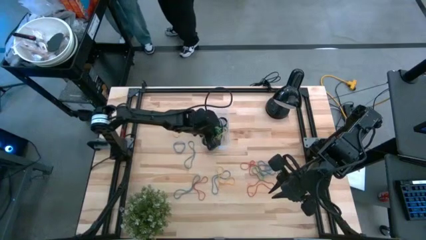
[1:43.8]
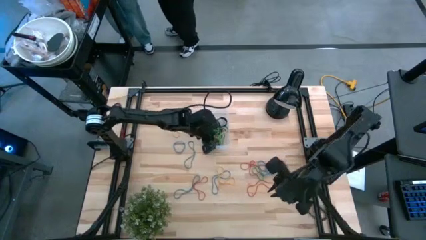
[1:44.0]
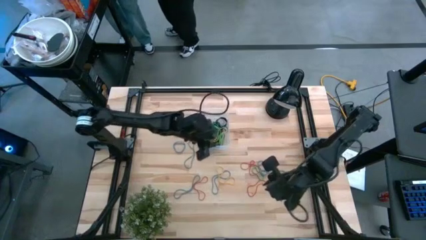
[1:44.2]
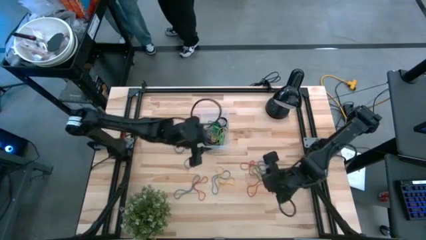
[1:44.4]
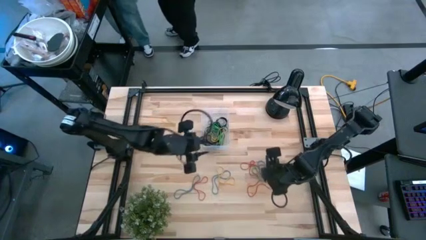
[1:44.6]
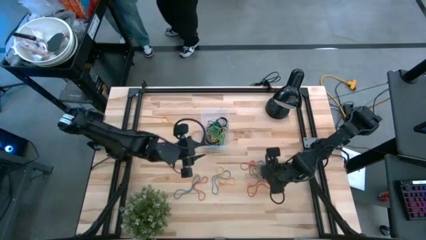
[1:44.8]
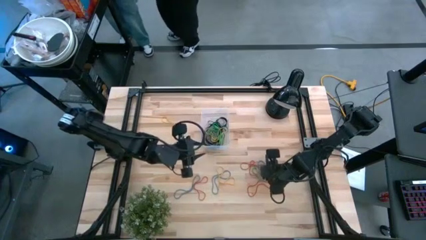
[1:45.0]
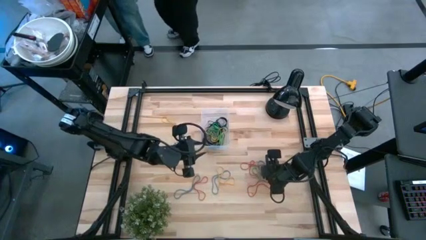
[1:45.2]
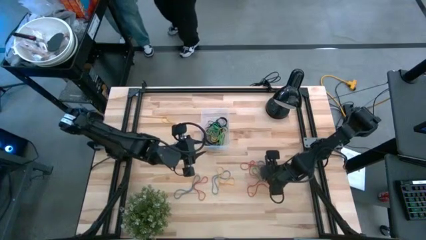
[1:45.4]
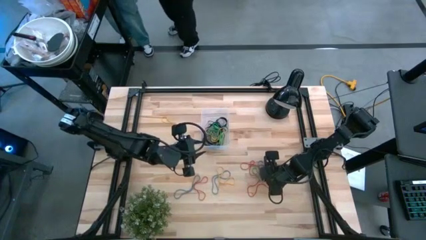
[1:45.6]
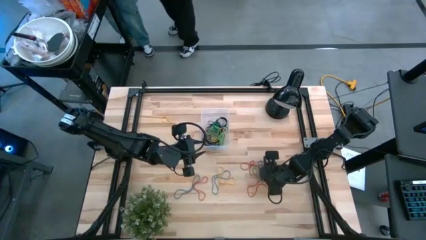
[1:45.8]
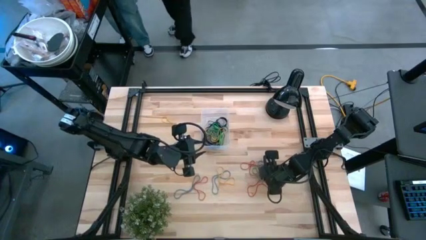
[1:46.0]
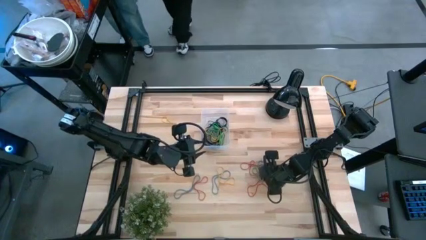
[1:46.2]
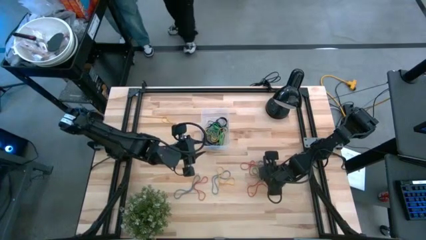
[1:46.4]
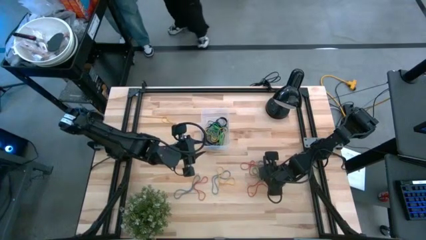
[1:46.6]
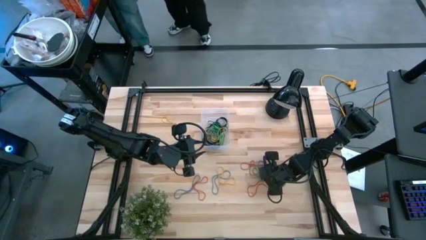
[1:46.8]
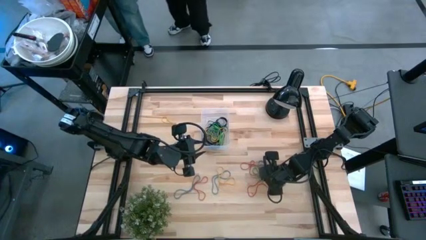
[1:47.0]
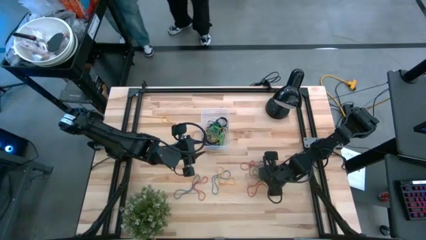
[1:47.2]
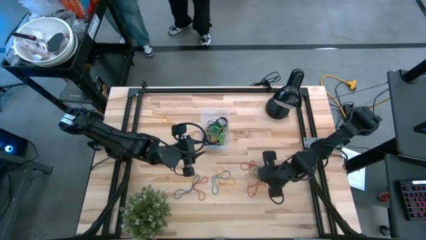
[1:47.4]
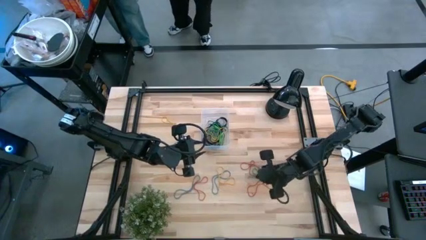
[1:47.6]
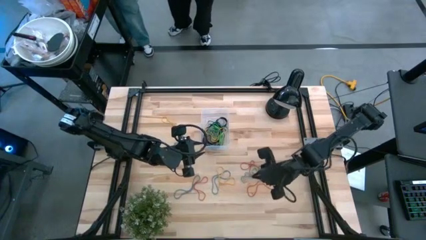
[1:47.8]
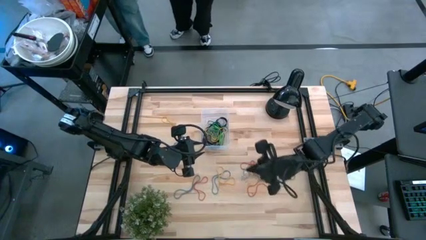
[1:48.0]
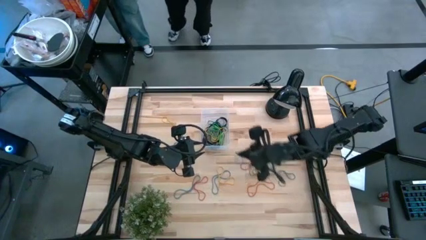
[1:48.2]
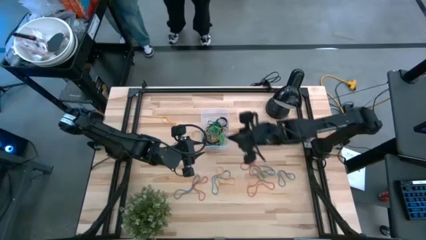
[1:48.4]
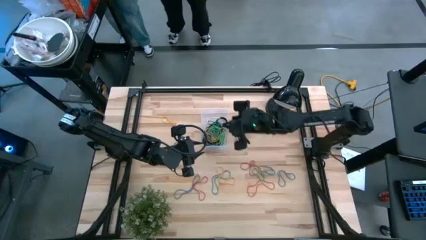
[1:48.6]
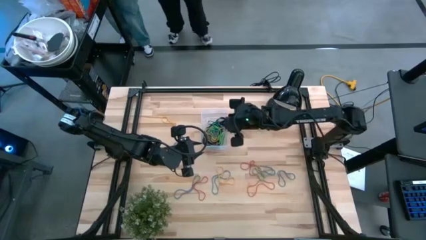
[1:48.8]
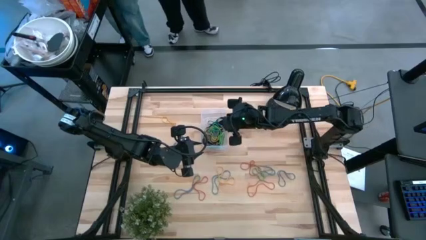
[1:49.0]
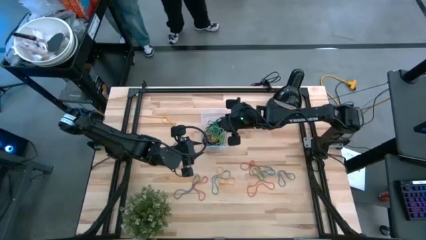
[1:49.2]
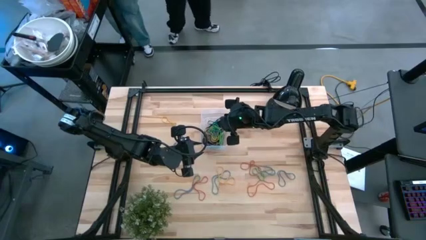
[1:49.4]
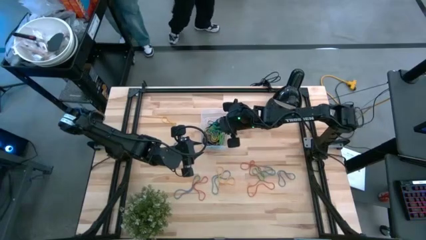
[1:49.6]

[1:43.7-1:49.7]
Task: Pick and place rubber bands into bin
Put the blue rubber band into the transparent bin

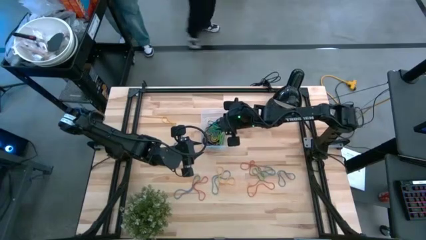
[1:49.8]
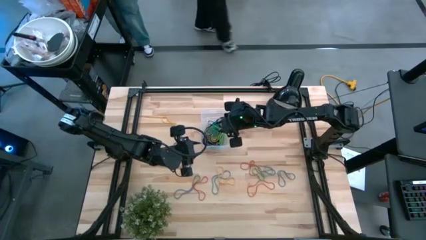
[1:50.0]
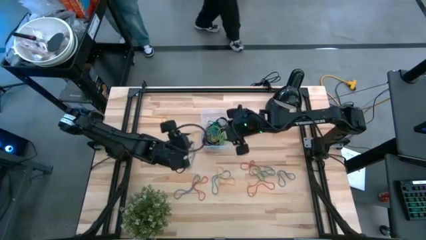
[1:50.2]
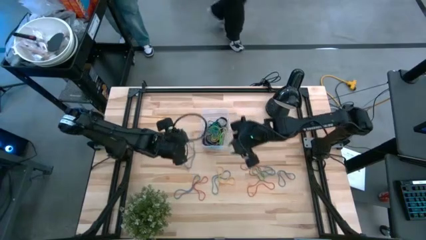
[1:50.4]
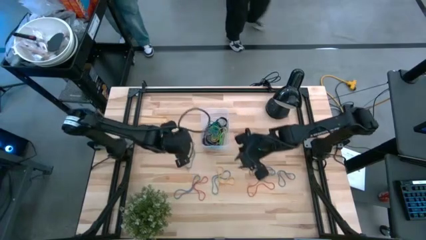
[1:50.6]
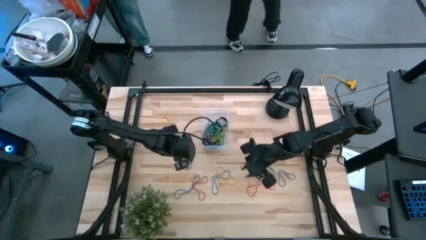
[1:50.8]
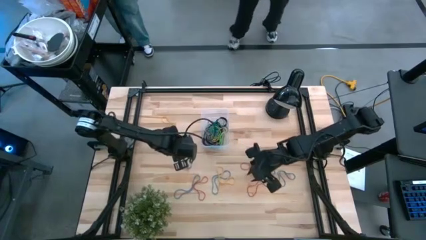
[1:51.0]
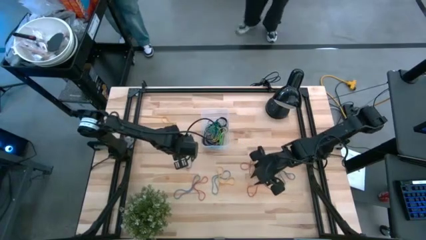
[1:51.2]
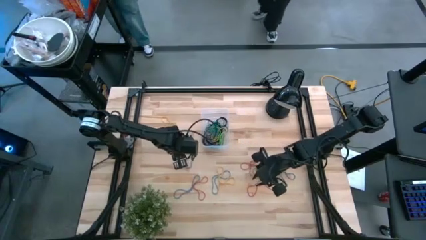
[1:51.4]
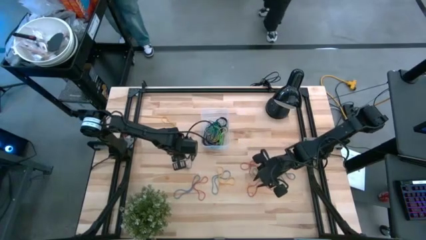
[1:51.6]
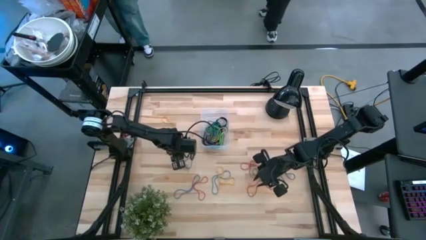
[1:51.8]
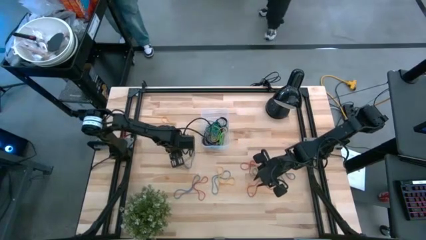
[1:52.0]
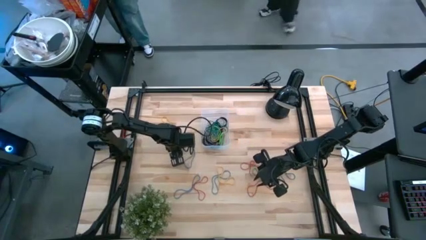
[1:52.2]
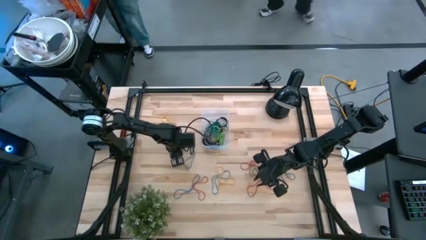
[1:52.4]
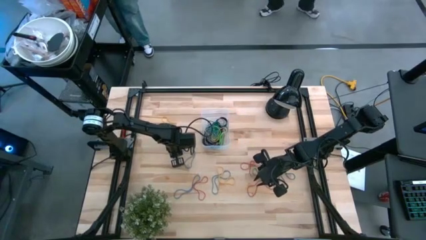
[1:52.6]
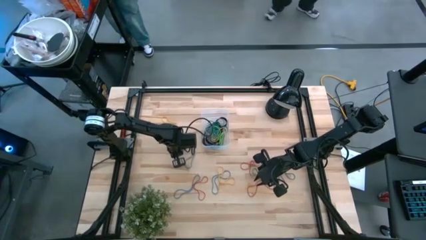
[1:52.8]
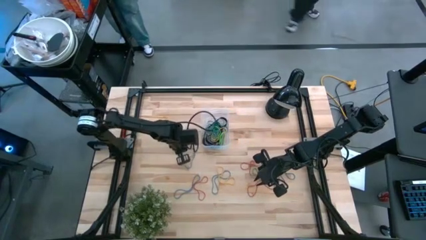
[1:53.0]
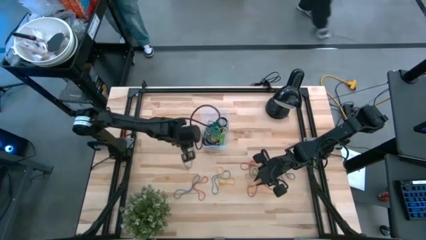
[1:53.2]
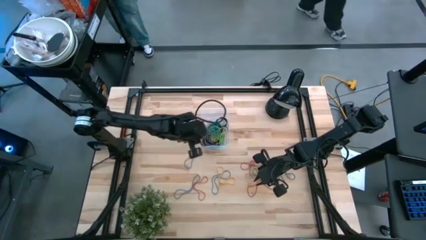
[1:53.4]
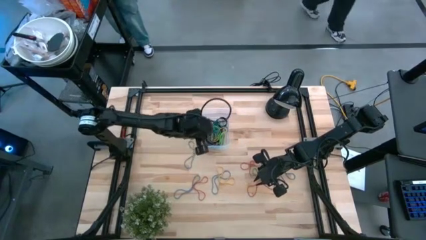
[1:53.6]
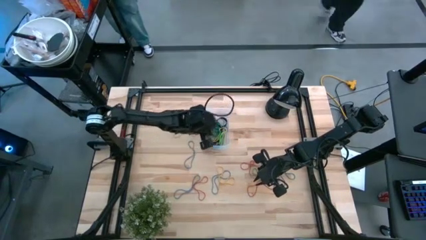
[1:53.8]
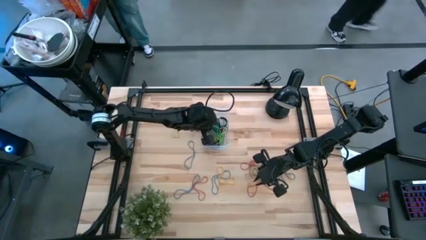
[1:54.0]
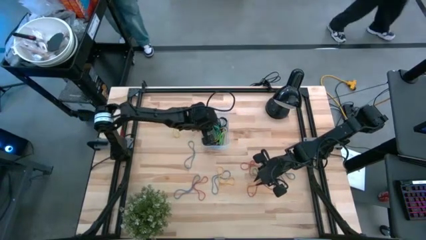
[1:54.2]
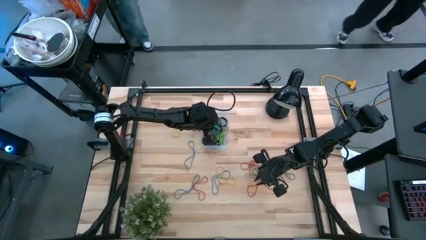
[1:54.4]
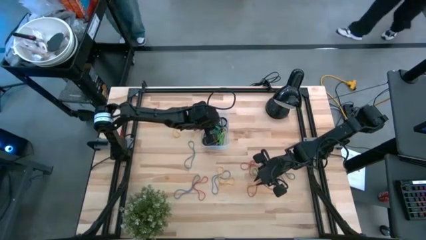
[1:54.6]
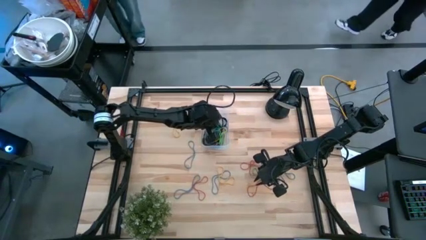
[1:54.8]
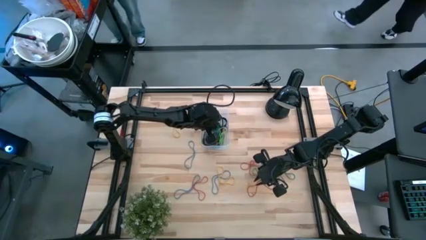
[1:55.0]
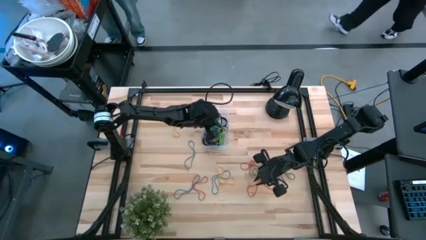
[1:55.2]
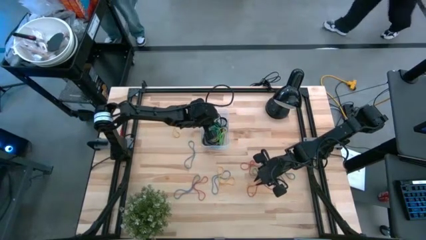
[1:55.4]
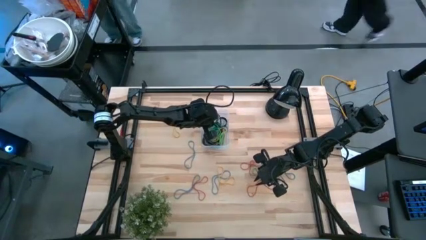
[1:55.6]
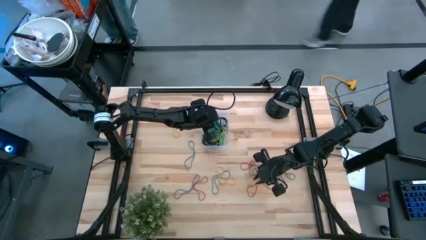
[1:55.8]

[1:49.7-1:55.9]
Put the blue rubber band into the transparent bin

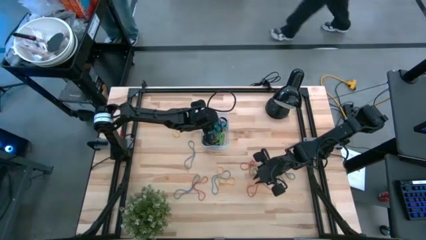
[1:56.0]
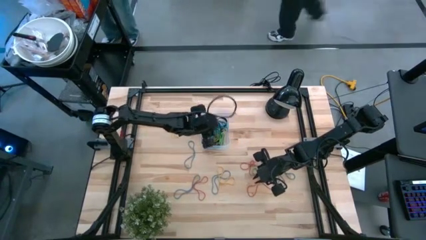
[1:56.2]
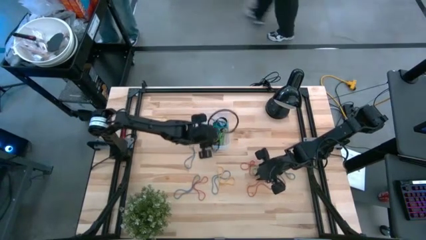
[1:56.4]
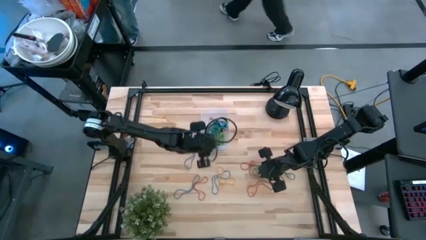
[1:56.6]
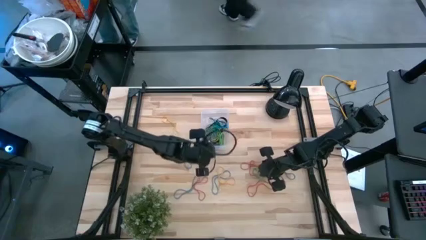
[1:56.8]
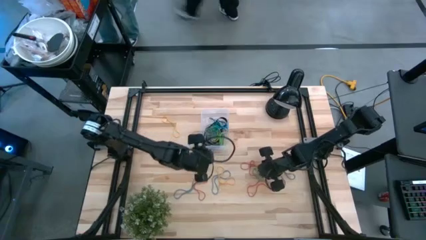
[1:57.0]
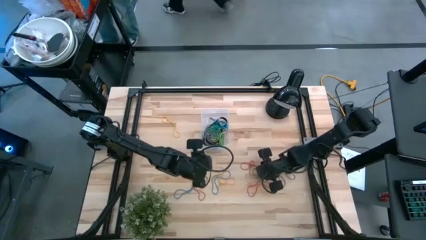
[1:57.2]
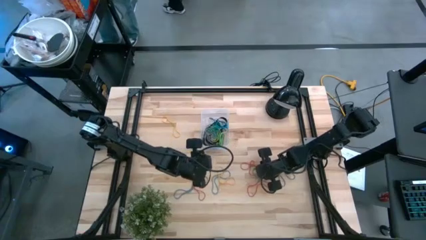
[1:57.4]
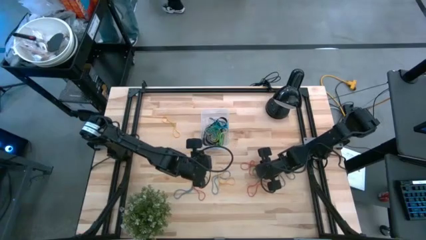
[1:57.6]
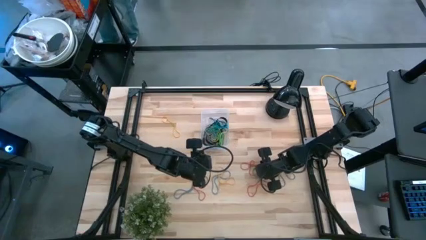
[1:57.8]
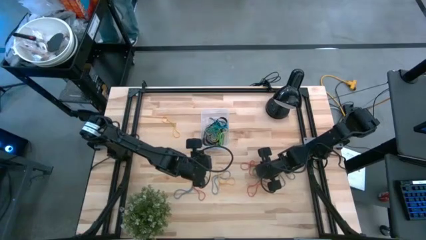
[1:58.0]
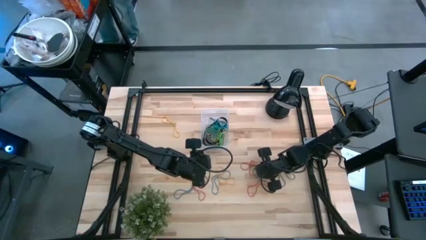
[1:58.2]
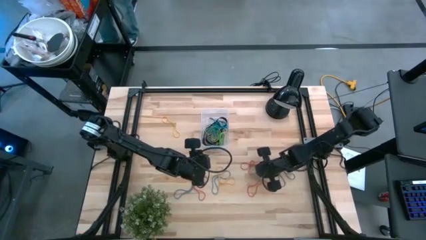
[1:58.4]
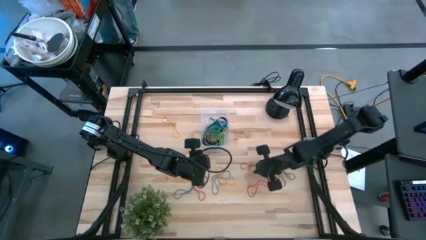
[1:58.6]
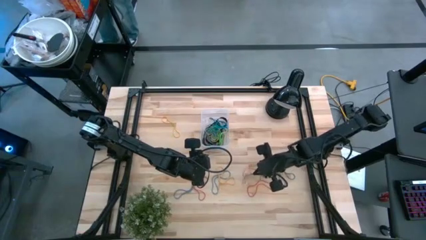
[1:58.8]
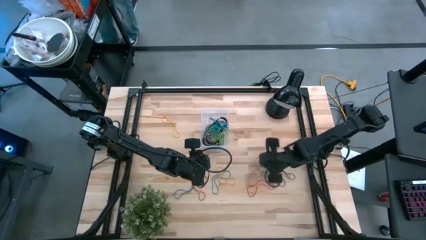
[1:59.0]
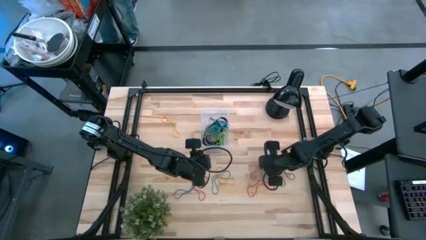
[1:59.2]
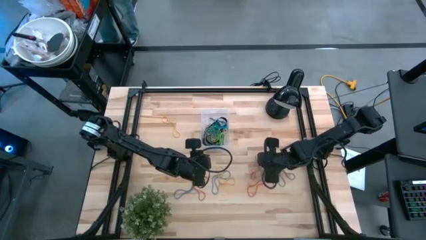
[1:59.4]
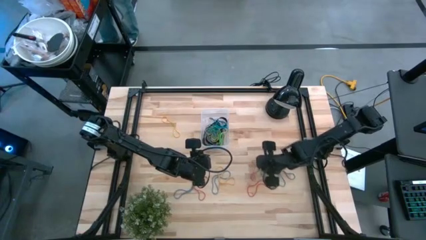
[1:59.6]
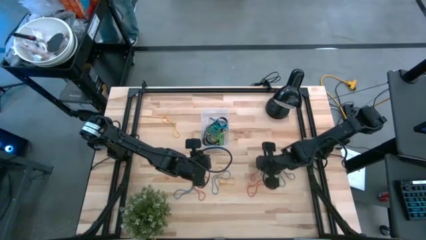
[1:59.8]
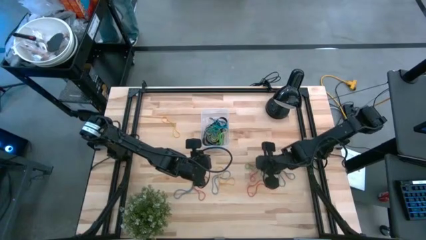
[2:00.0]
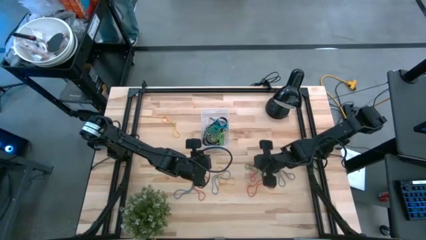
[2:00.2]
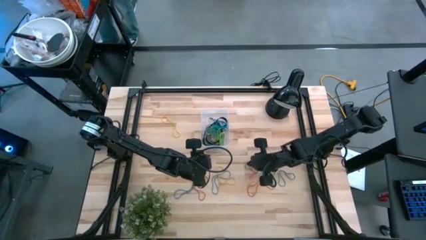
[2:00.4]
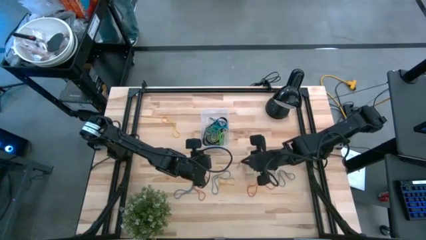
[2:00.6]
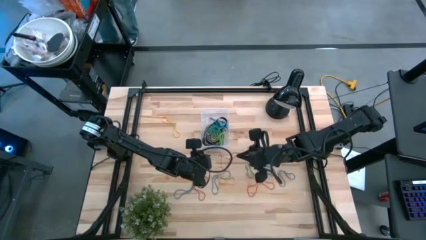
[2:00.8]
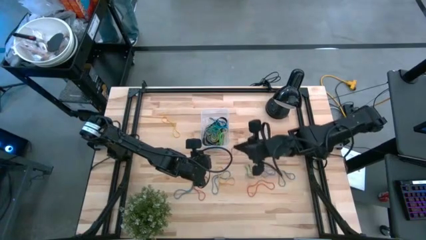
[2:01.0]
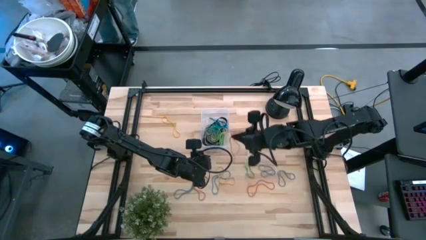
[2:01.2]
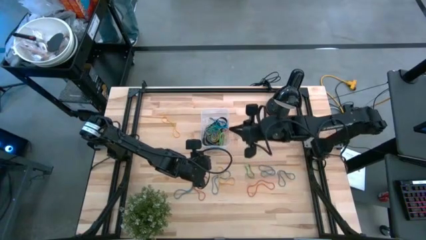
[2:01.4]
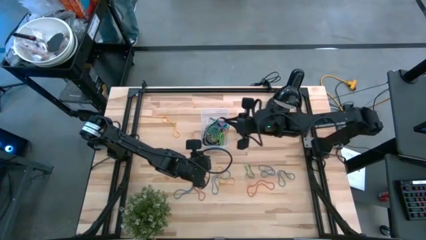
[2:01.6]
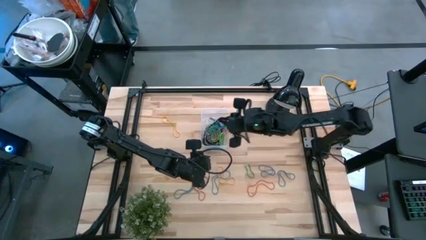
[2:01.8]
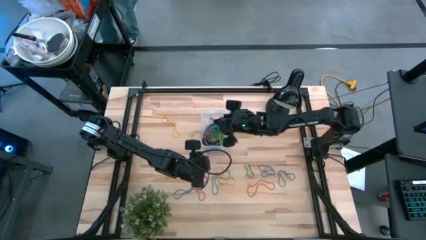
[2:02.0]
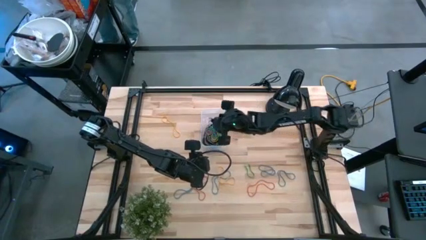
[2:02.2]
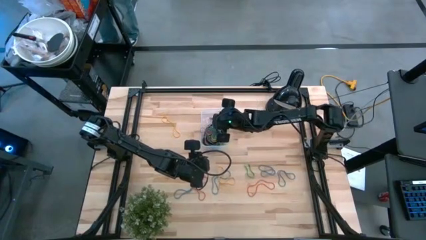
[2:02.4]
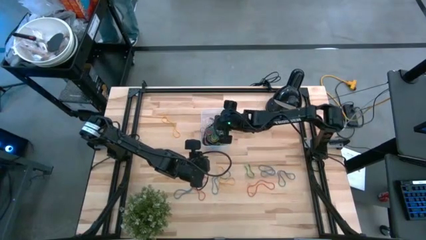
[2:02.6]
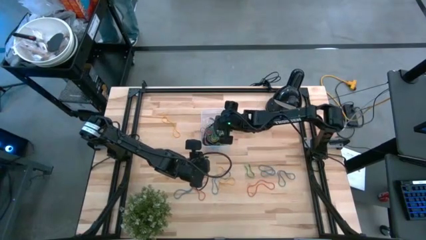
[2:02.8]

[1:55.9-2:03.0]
Put the red rubber band into the transparent bin
